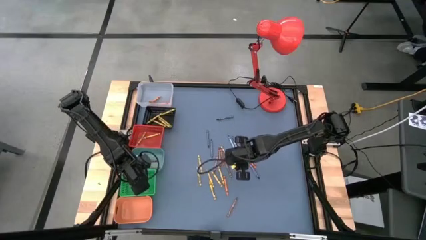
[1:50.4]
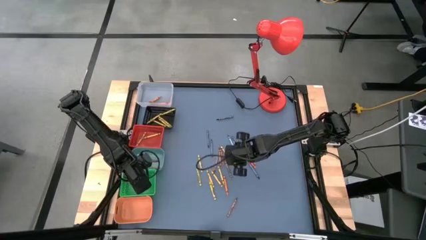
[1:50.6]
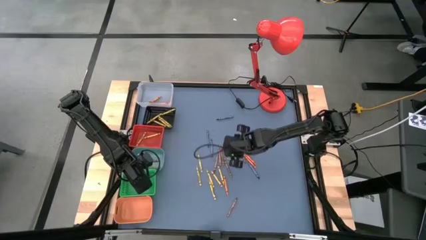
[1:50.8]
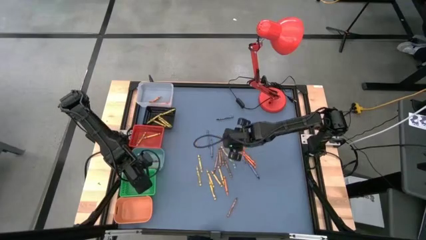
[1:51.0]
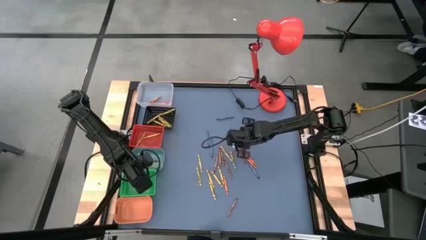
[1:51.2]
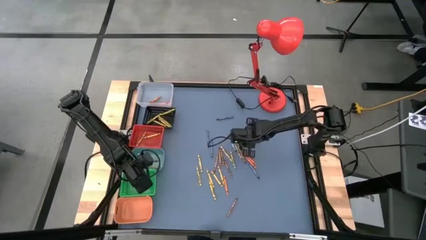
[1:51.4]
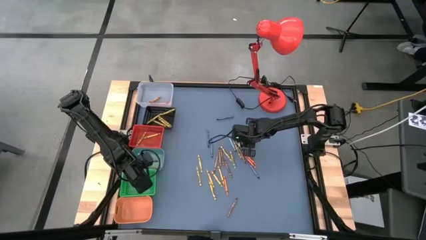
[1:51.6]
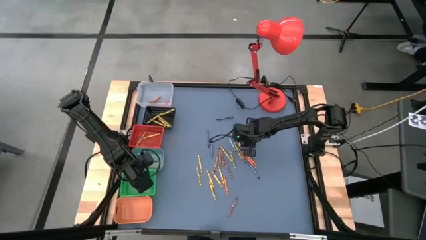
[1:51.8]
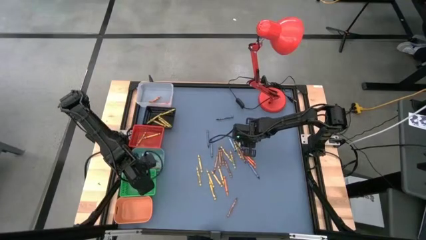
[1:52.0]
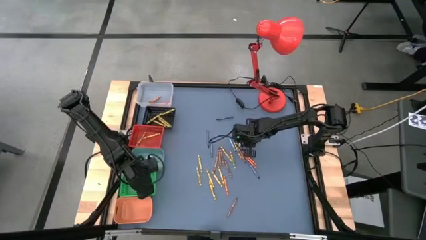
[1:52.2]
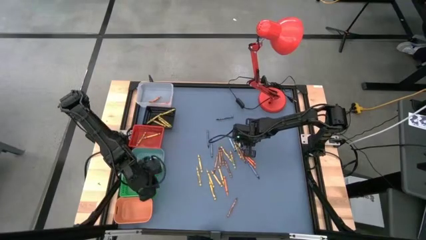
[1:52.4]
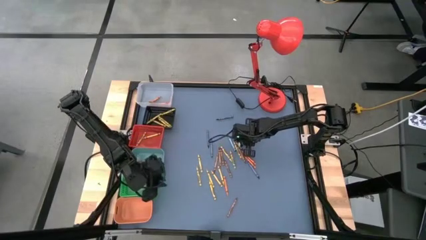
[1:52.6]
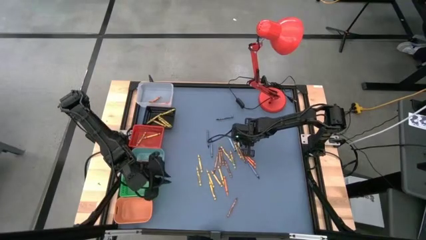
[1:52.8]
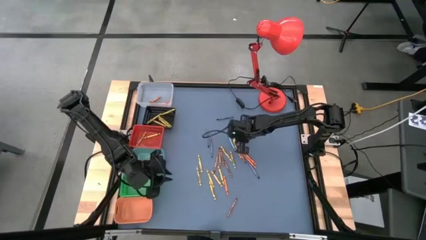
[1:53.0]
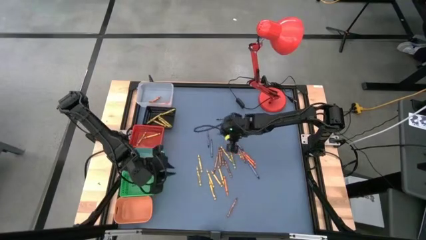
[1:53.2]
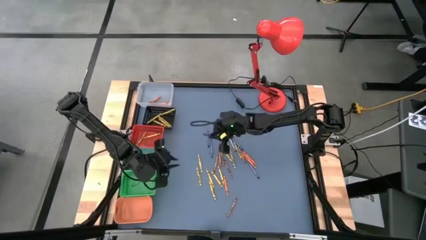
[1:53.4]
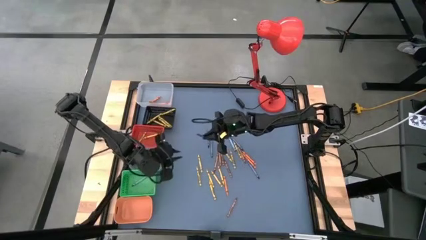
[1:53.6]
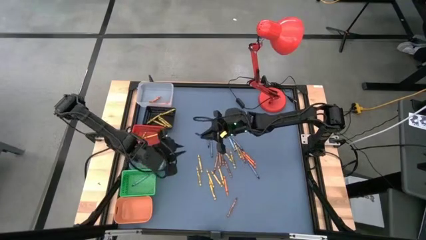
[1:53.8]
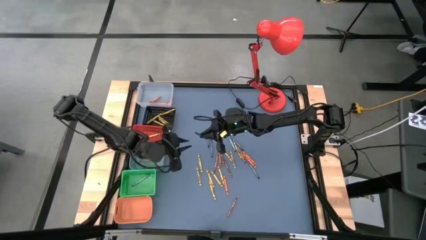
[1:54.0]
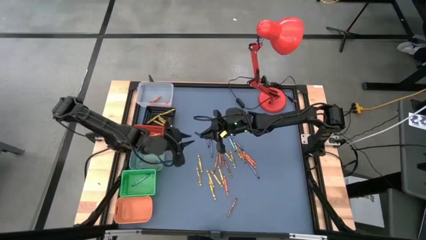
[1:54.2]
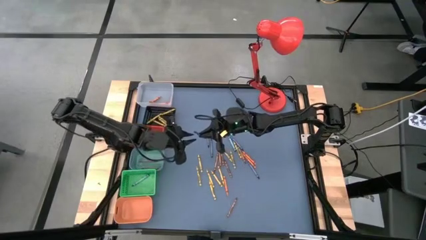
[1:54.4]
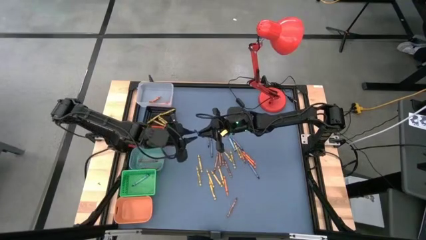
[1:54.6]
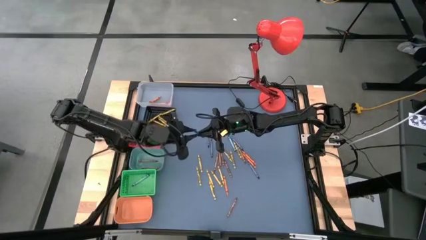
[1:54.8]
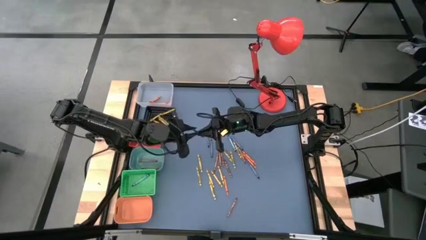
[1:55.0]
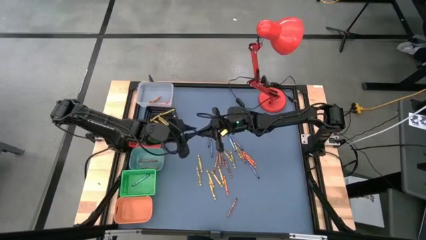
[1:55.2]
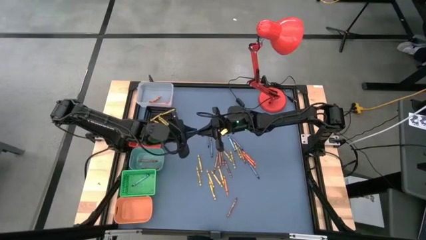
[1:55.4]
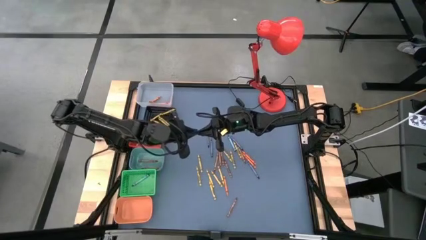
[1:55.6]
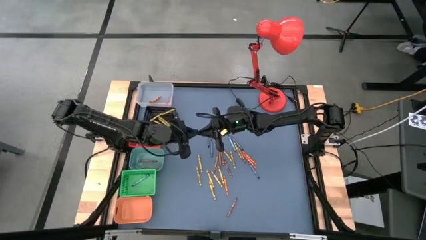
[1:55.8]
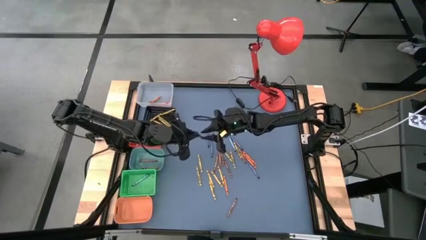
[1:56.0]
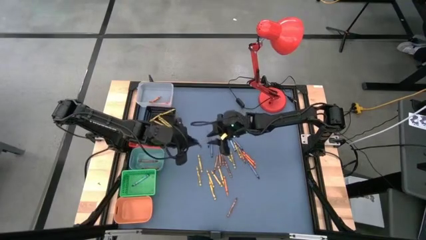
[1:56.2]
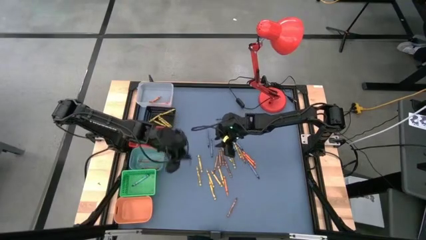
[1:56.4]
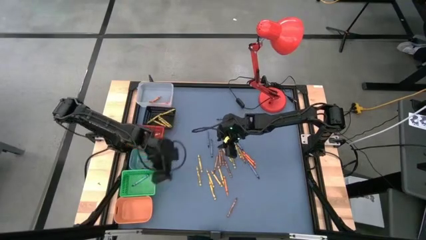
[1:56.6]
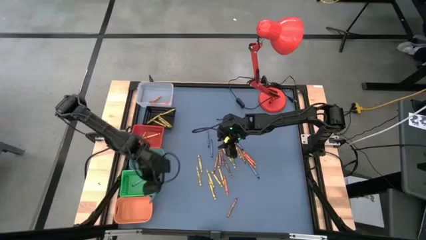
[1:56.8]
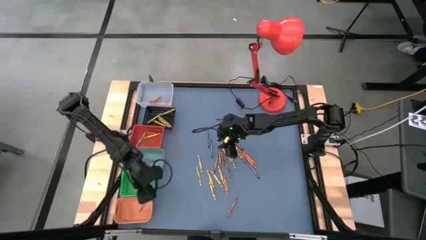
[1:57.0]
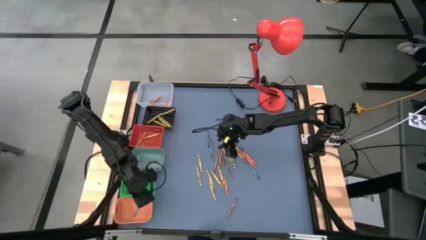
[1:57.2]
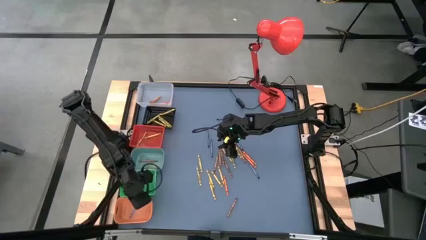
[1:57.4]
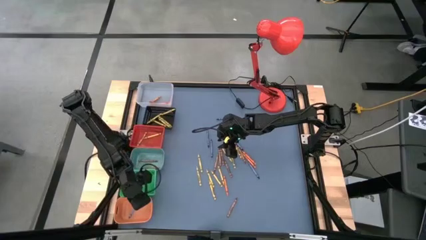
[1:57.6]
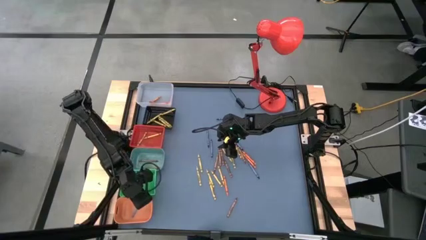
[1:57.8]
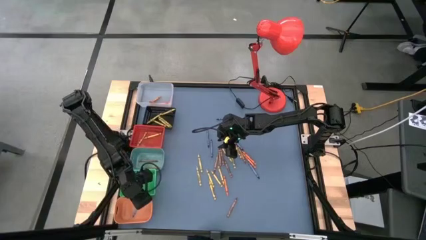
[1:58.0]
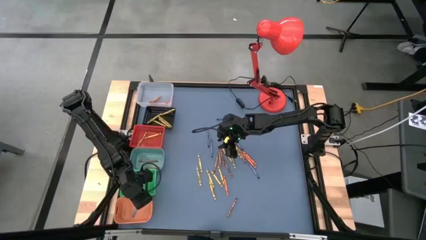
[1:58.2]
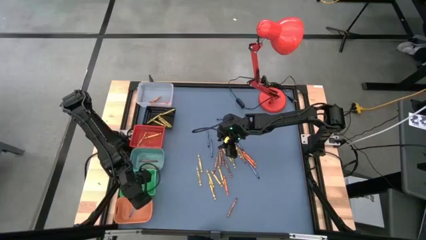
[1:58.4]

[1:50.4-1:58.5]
Task: Sort crayons
Put the violet crayon into the light orange bin

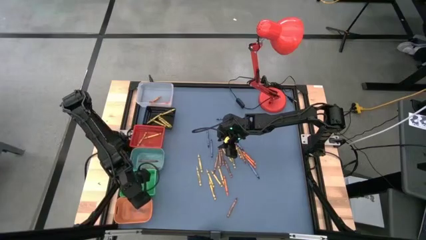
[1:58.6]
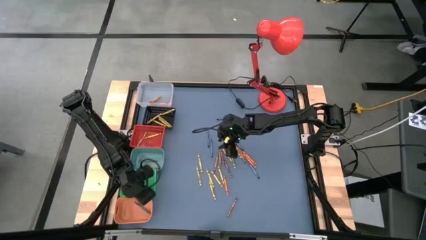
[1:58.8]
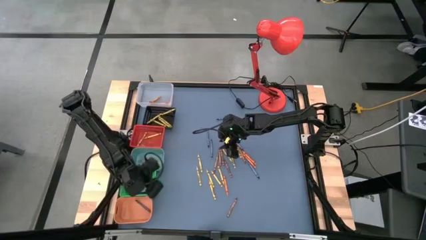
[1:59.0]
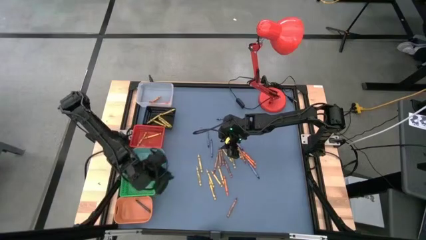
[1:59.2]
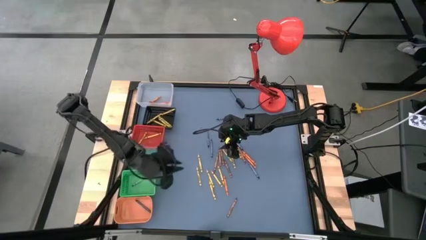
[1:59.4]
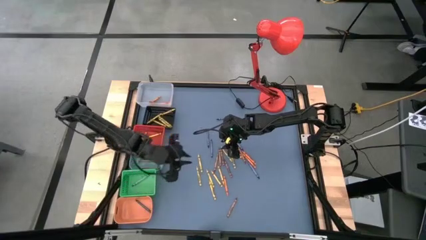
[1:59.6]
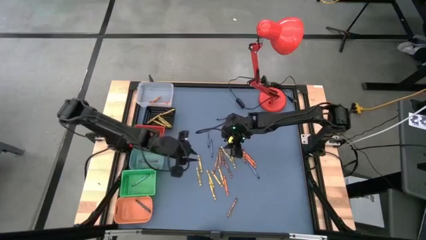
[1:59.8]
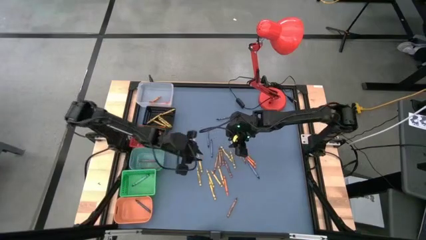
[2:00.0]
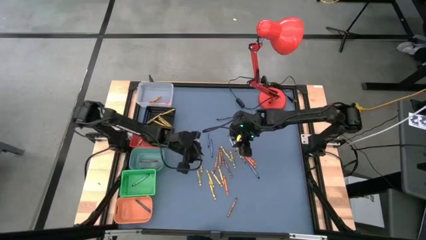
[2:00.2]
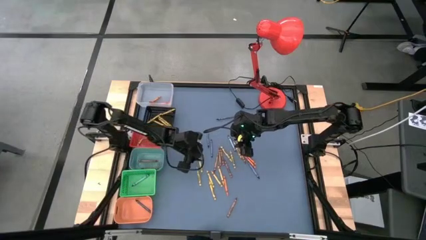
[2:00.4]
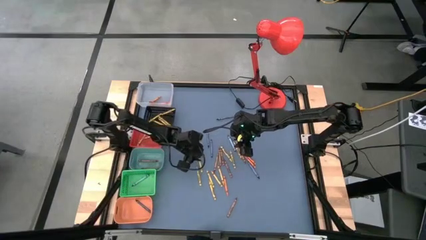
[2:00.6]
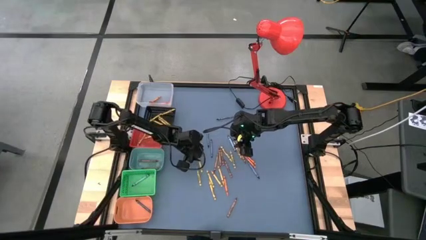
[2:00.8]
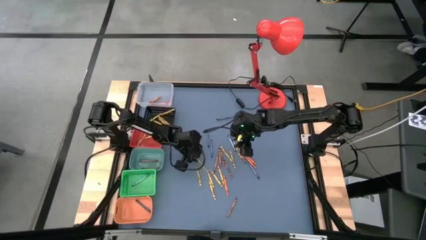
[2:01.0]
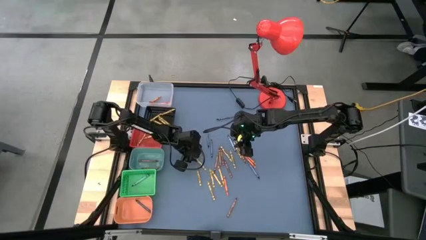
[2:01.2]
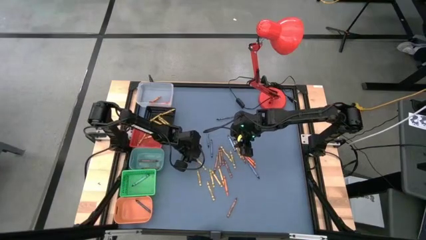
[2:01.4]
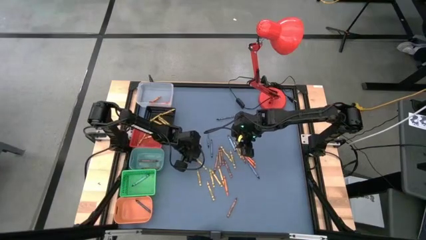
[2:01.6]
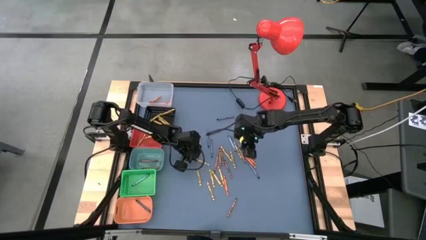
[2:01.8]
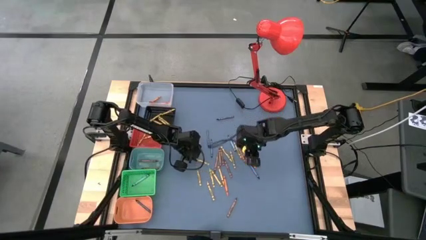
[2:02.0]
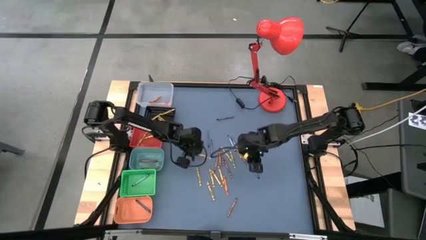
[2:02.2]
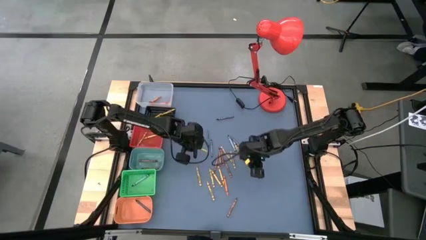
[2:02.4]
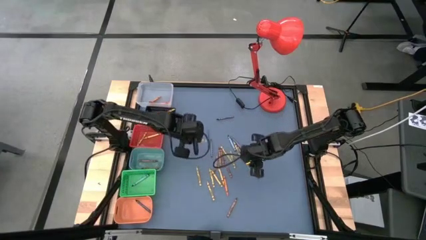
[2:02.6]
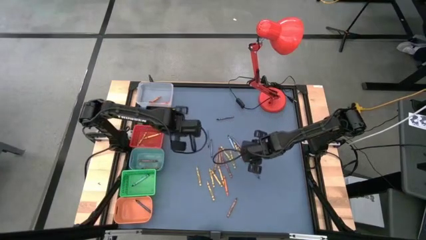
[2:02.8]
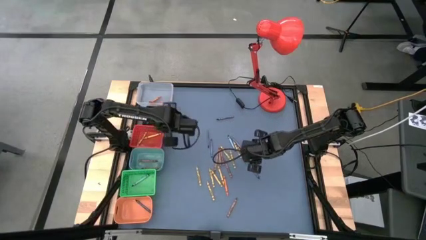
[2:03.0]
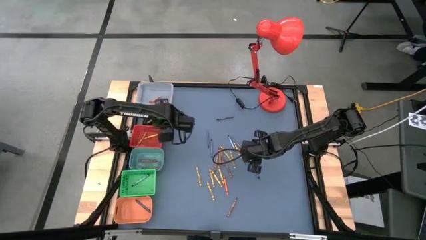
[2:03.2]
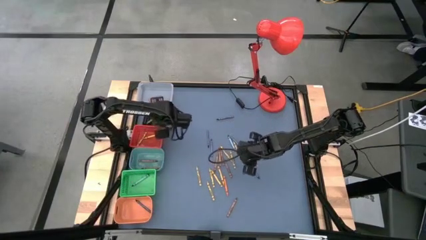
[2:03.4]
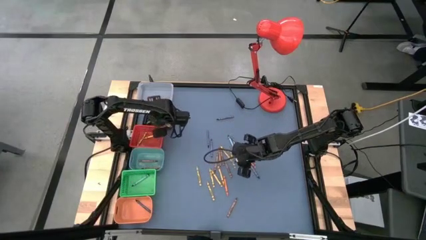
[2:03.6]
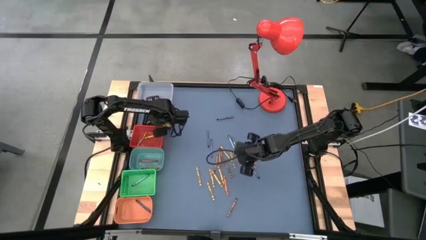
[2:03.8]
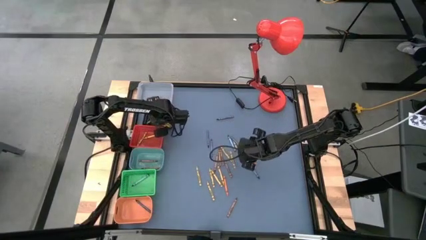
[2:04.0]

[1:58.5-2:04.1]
Put the green crayon into the black bin

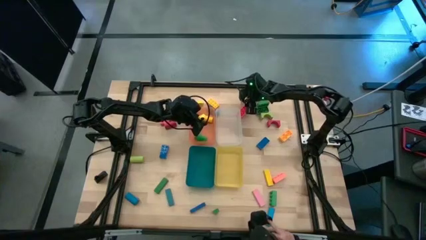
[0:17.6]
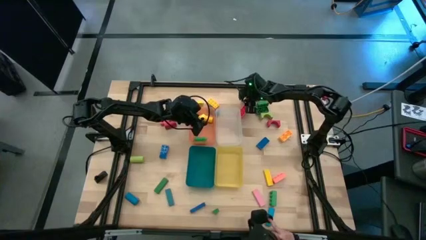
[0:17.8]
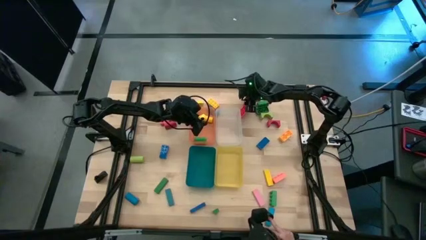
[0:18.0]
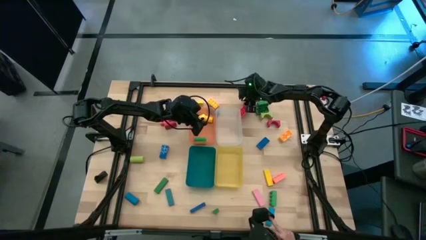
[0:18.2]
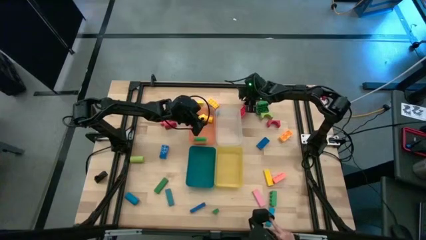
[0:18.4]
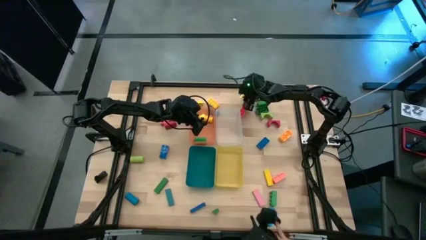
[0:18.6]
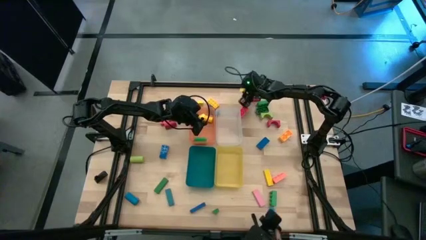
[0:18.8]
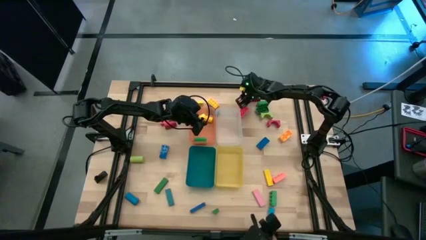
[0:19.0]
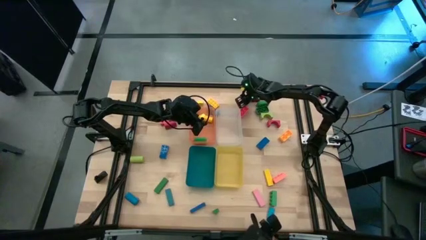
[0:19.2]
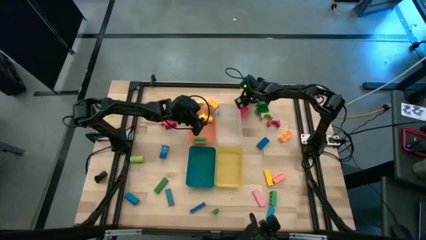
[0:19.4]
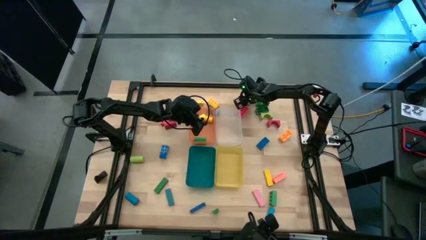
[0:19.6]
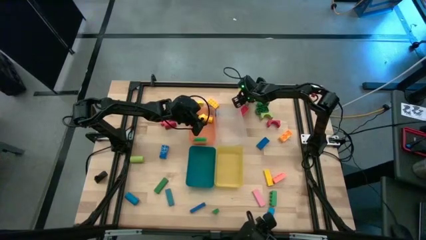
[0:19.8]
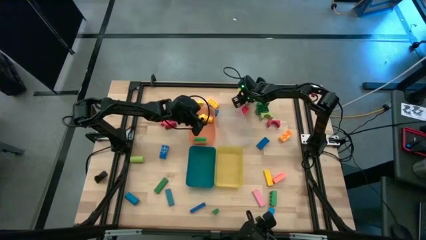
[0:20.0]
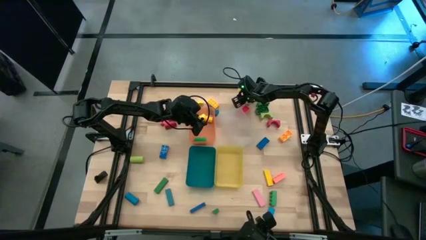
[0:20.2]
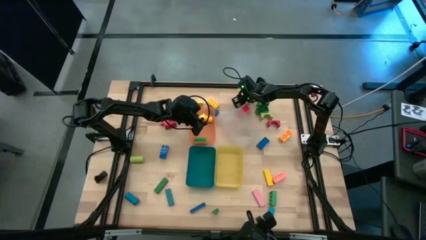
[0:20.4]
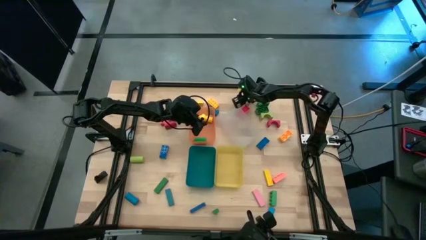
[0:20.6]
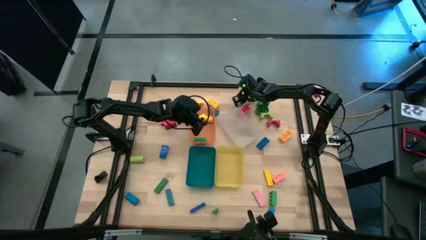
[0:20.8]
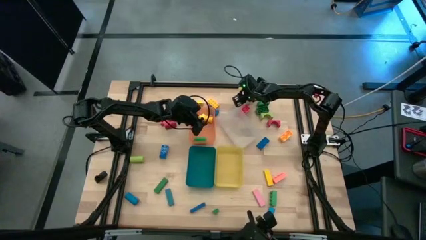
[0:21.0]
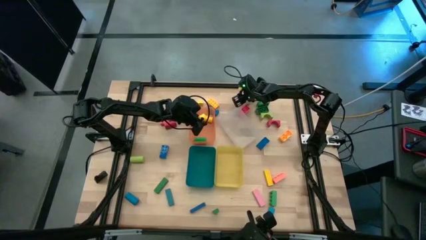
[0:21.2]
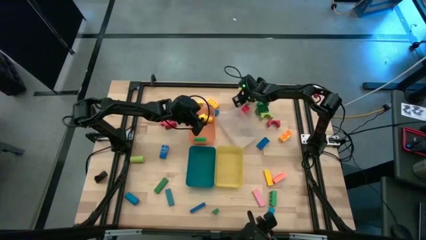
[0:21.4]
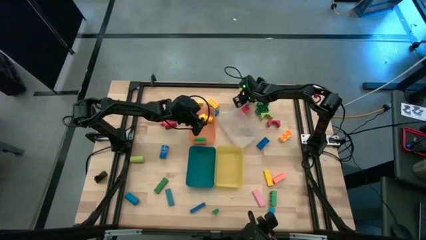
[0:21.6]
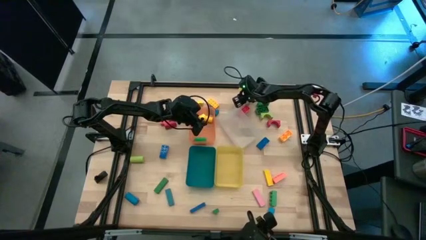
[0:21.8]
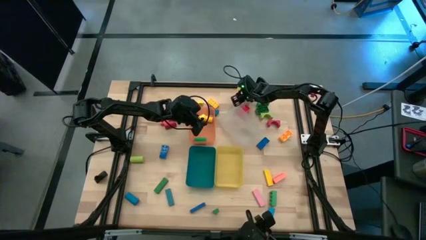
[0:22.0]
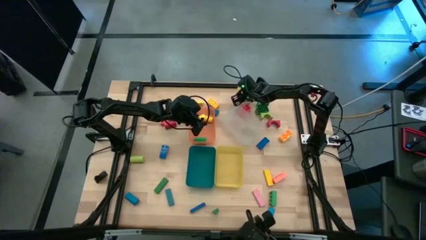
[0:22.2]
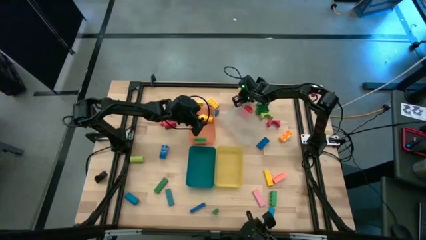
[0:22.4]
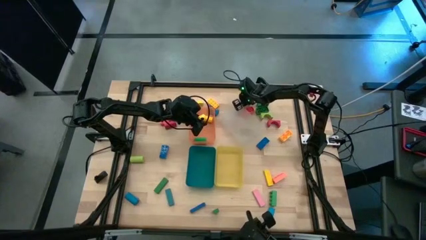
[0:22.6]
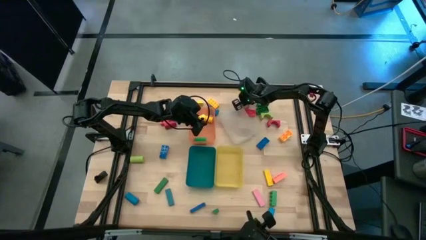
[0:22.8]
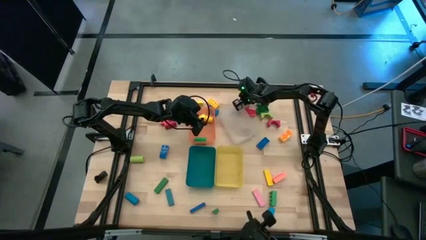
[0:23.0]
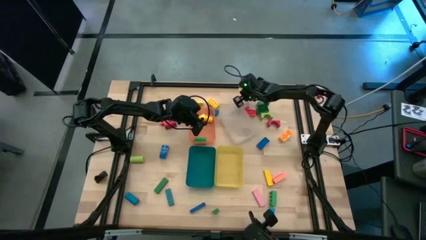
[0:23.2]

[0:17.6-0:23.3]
Task: Sort blocks by size
Put the brown arch block into the transparent bin
